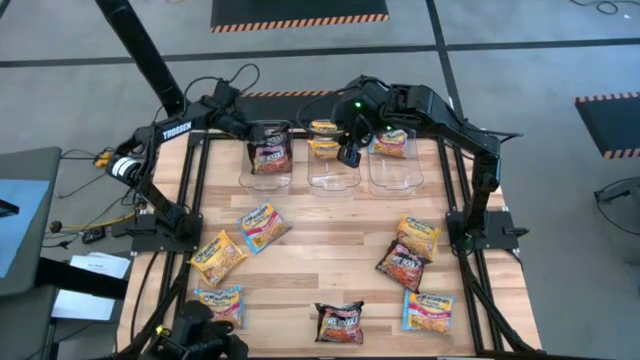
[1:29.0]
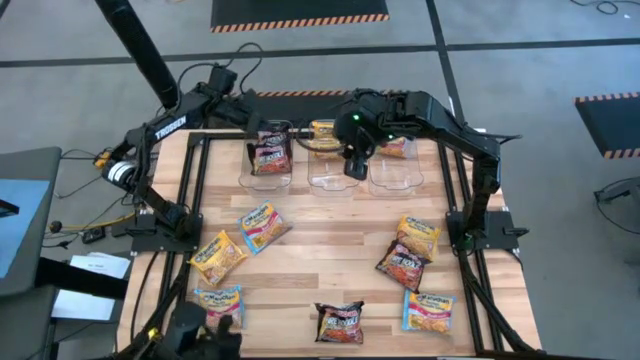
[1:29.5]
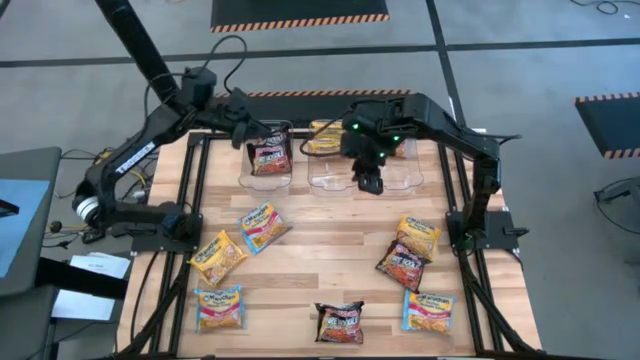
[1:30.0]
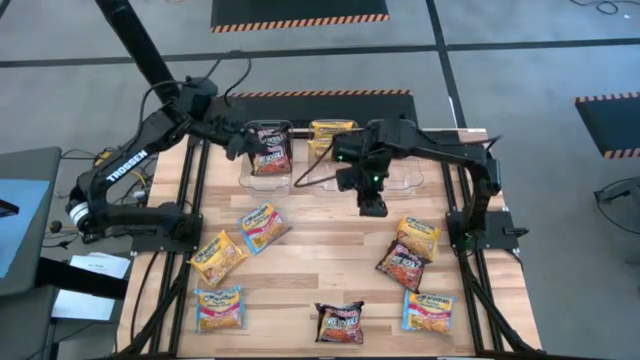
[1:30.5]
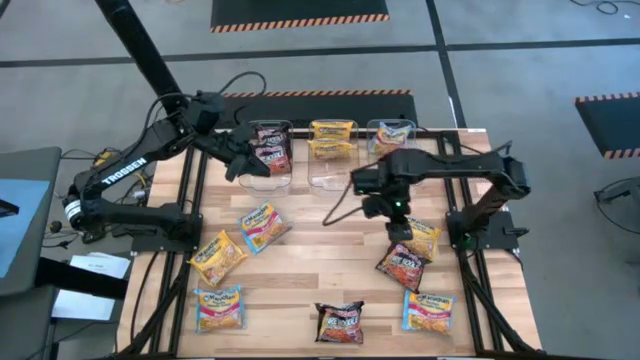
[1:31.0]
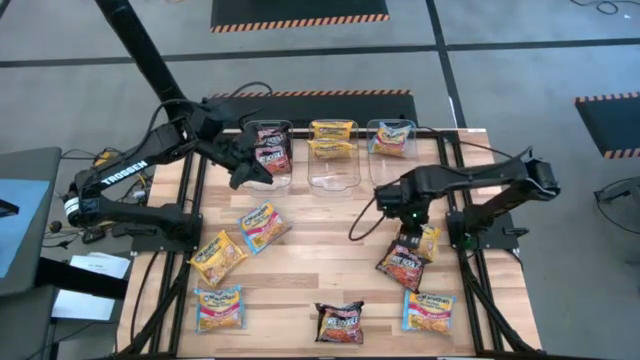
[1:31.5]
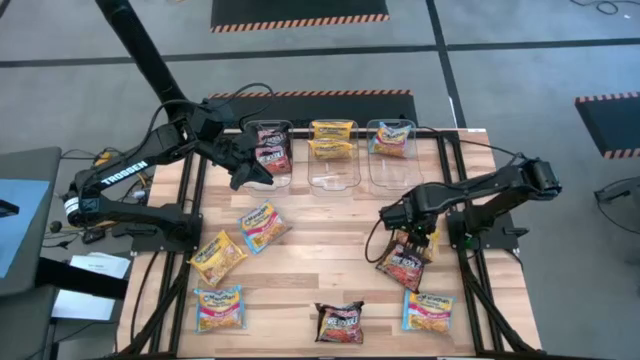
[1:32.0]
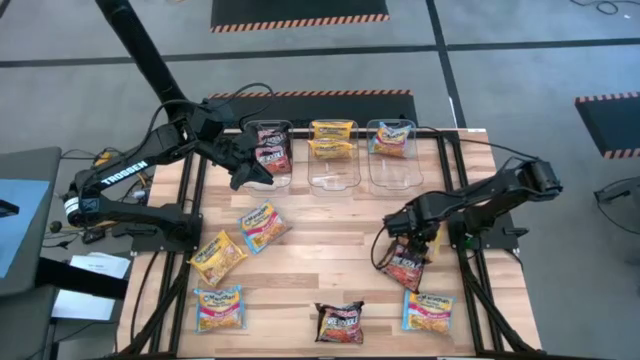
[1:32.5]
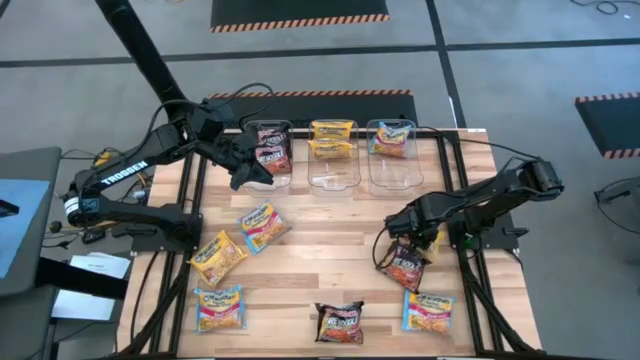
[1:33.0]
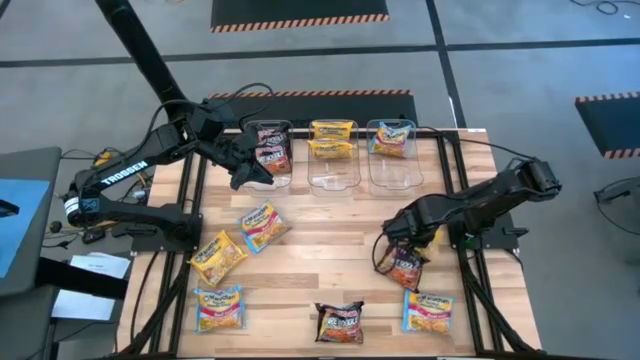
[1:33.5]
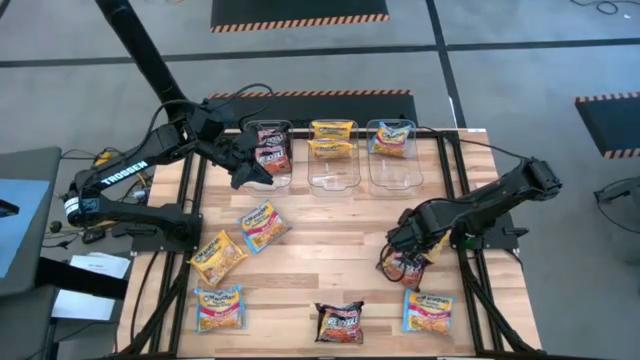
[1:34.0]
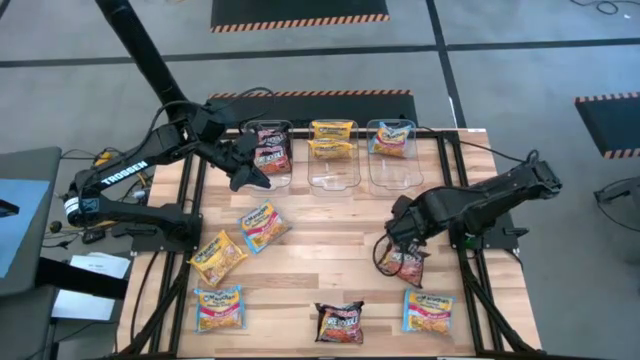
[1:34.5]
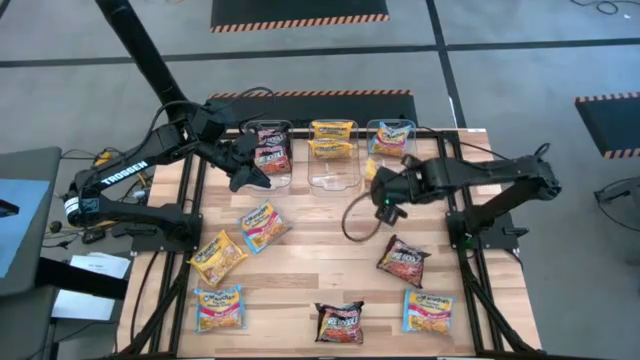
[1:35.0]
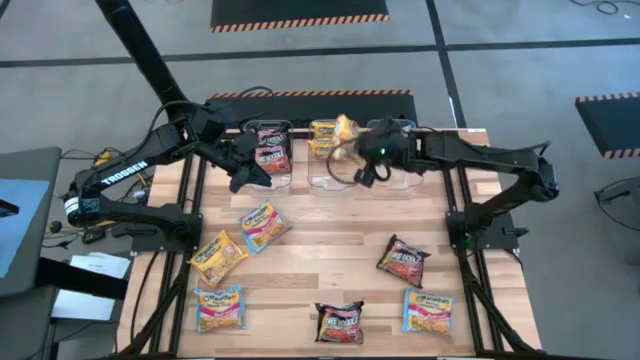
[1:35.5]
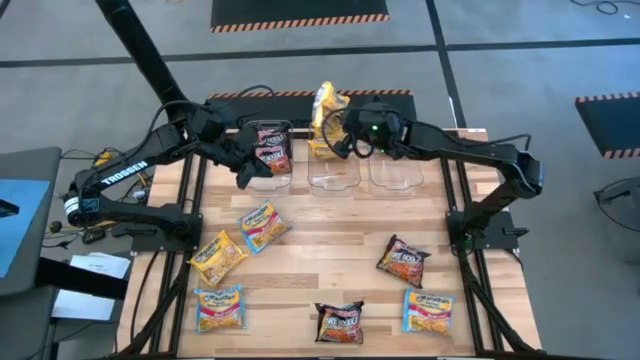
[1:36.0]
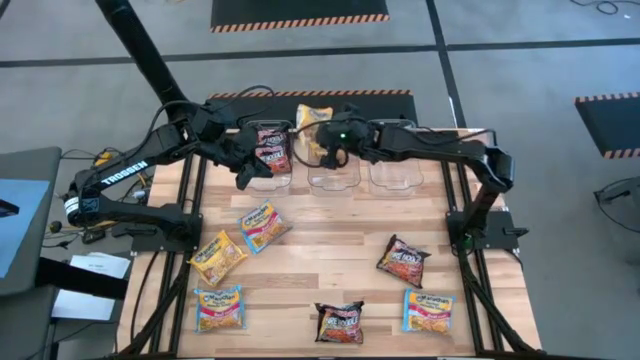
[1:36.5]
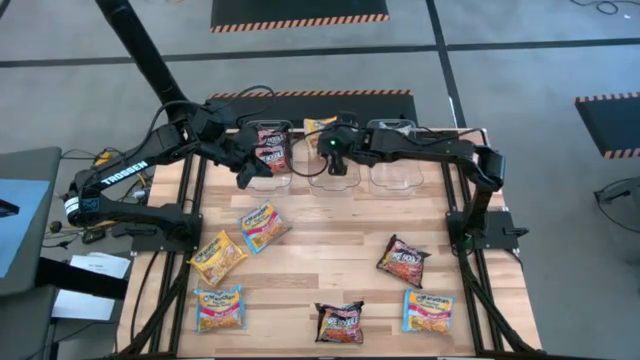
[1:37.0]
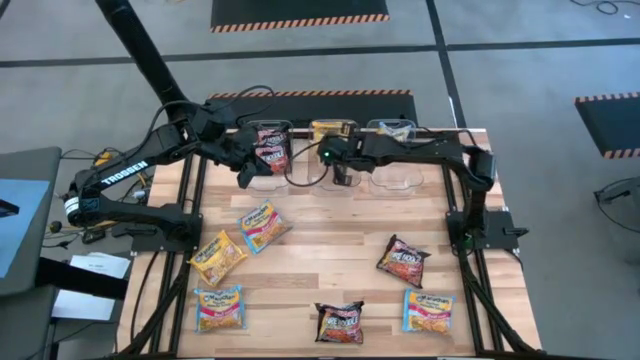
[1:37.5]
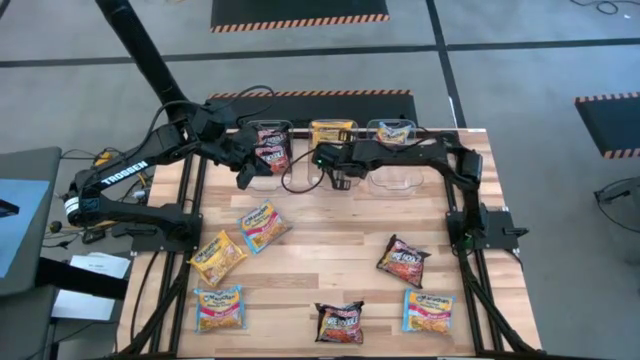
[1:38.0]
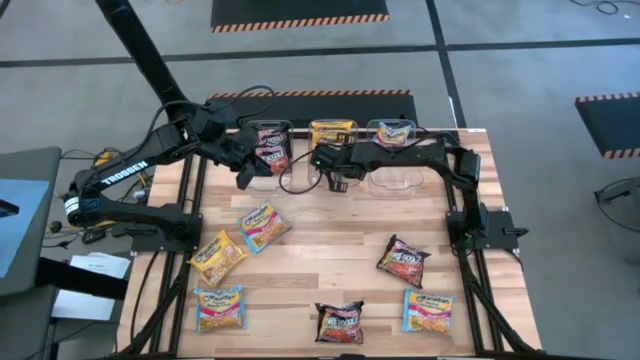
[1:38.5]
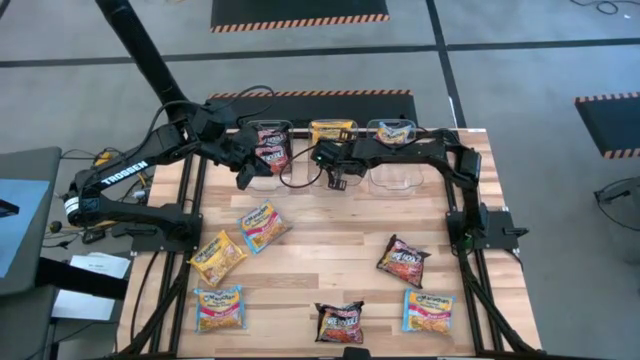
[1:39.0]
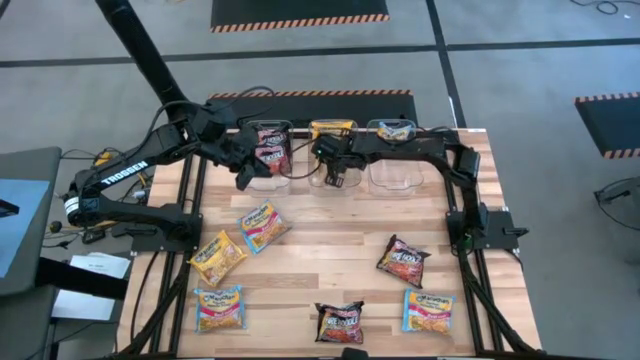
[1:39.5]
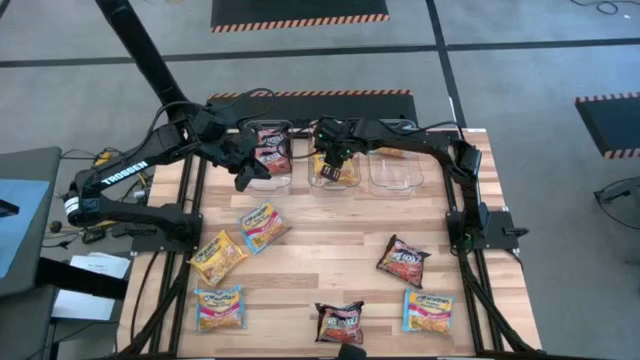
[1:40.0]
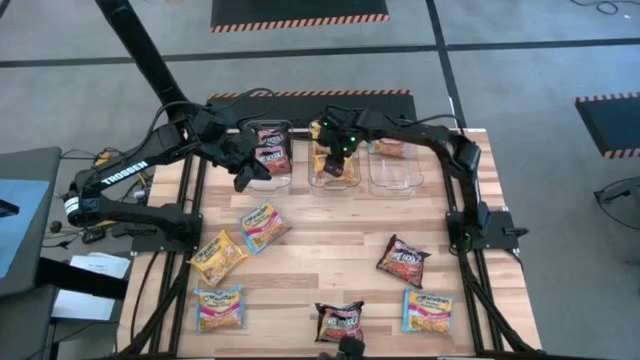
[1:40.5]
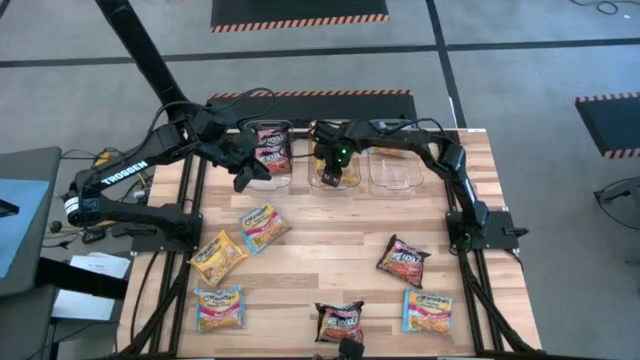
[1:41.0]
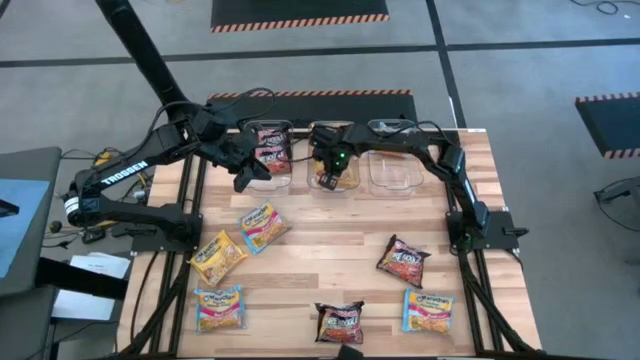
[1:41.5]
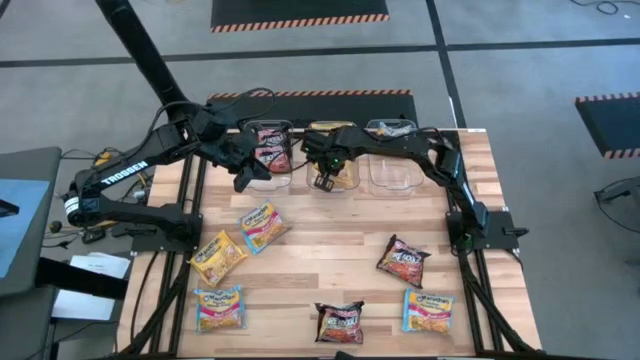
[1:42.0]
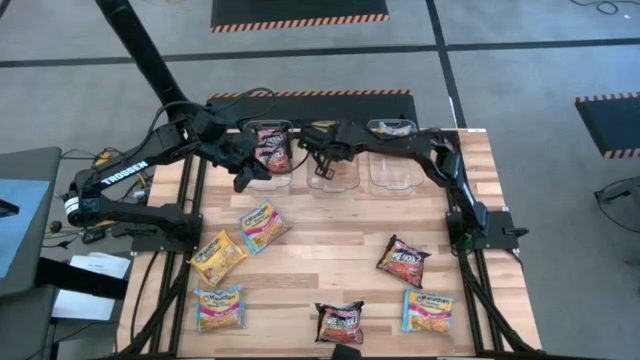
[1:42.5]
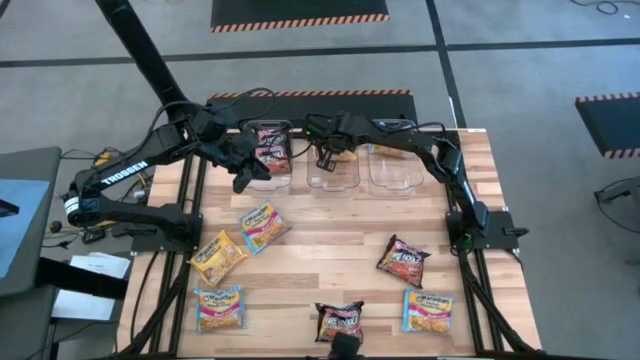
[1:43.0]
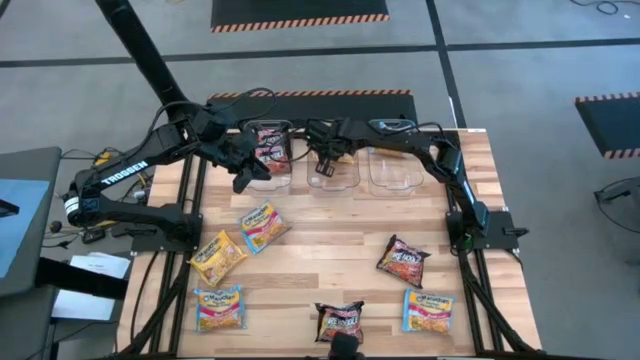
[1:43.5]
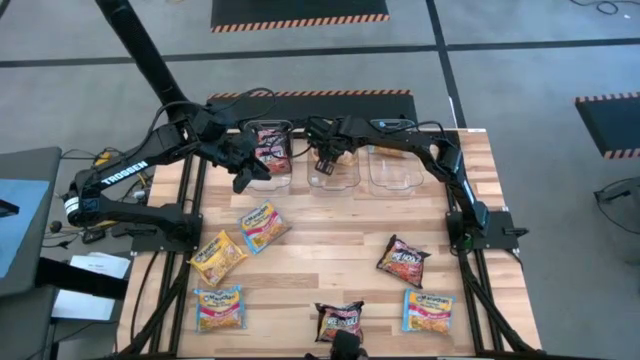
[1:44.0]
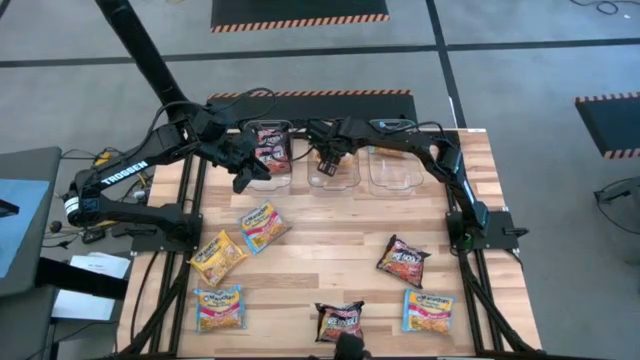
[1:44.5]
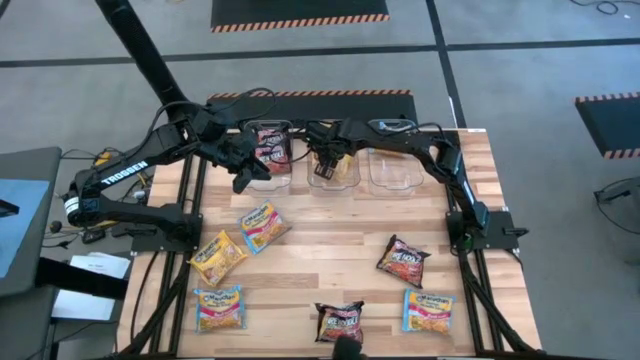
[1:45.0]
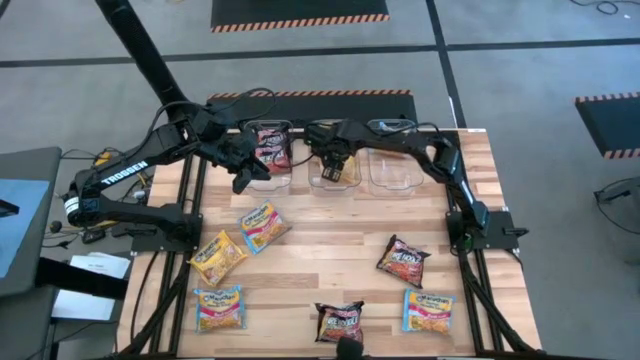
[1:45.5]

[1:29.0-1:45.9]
Task: Sort Maruchan noodles
Put the yellow noodle pack into the center transparent bin

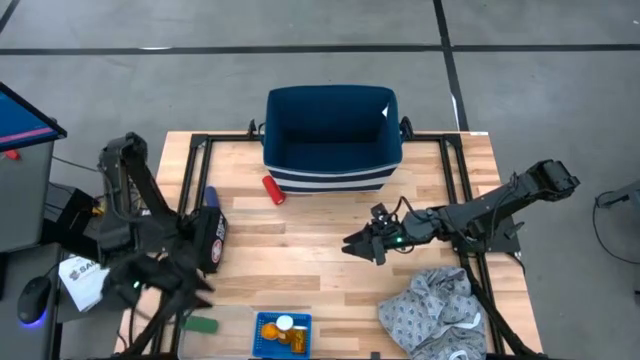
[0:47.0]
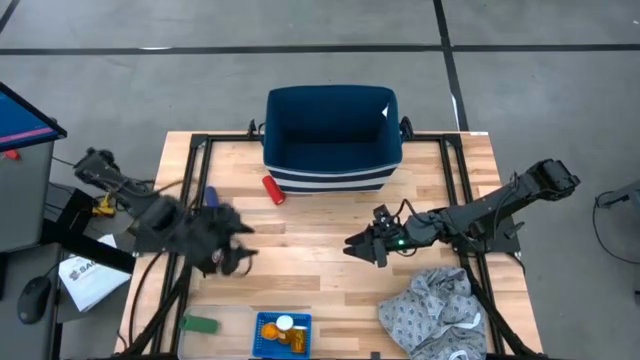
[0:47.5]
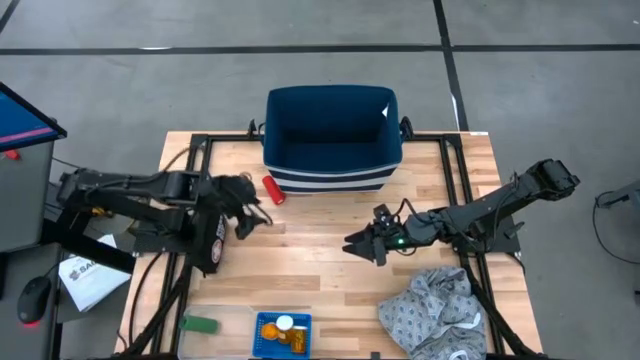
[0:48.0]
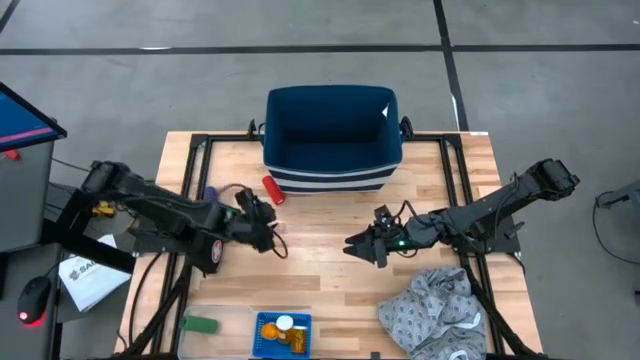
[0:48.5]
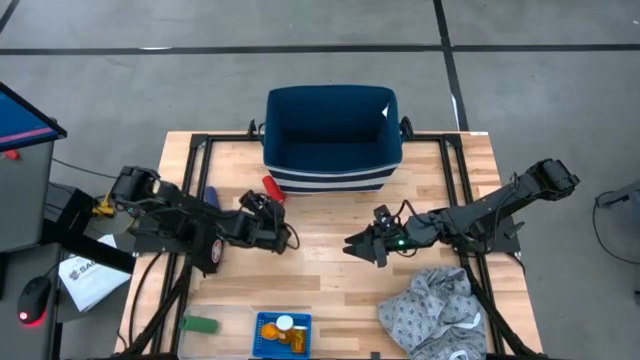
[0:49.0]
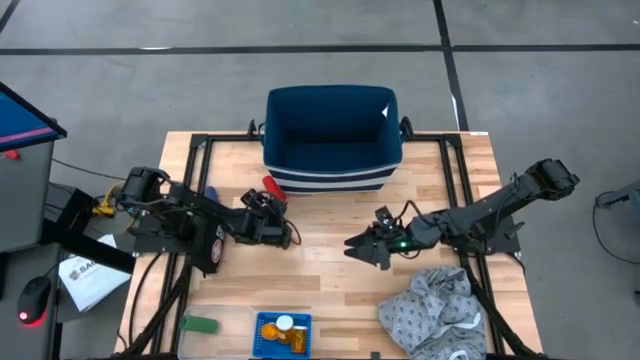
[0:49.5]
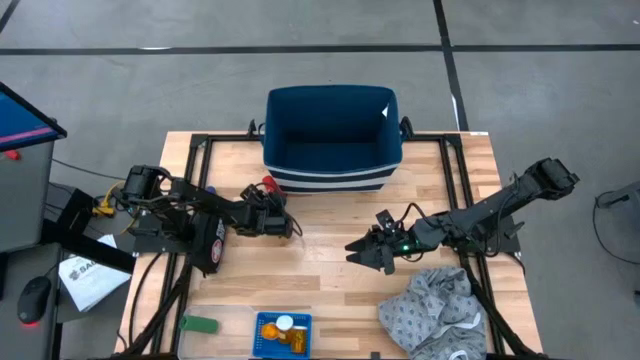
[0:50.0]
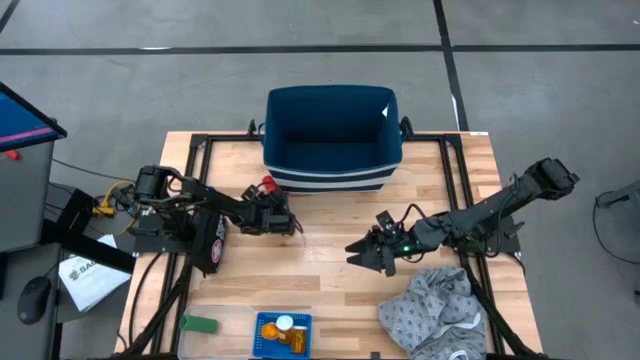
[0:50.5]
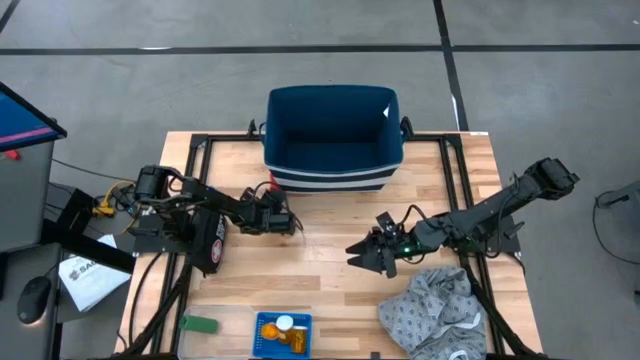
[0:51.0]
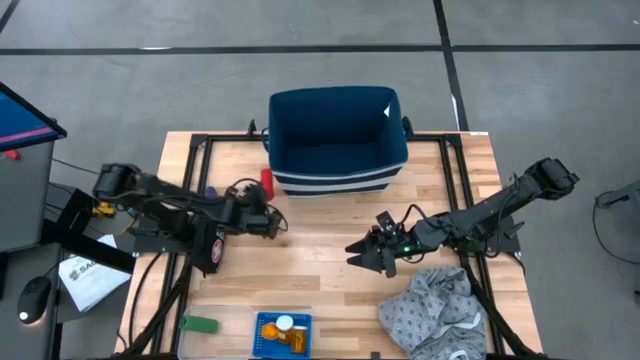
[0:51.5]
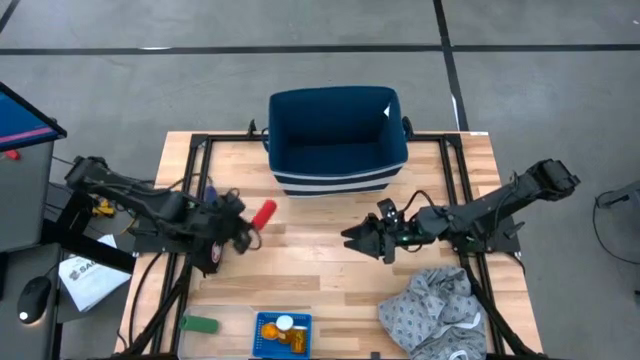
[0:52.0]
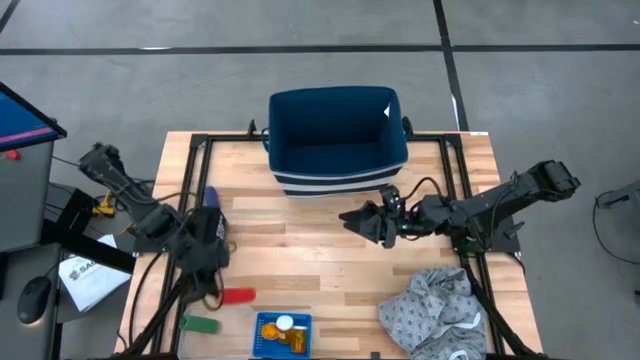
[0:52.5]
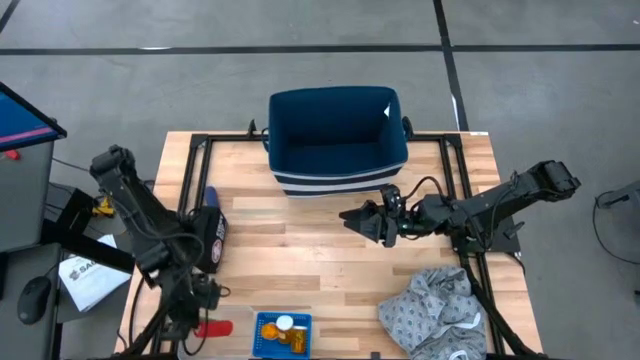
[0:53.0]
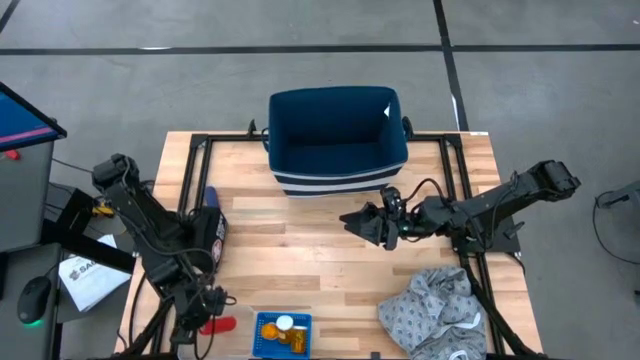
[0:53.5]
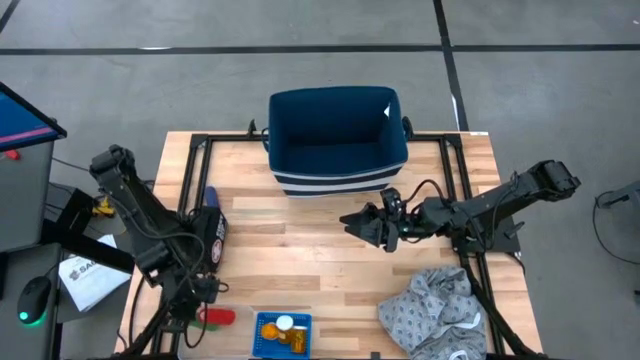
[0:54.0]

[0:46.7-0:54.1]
Task: Pick & place medical supplies in basket/bin
Put the orange bandage into the transparent bin
